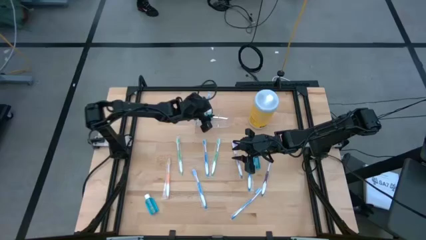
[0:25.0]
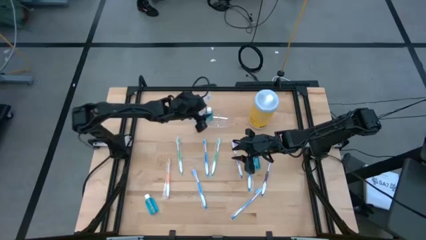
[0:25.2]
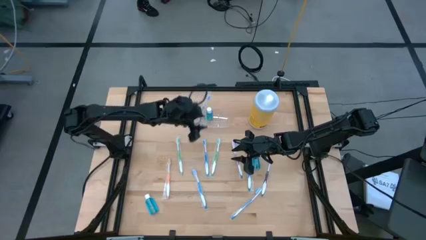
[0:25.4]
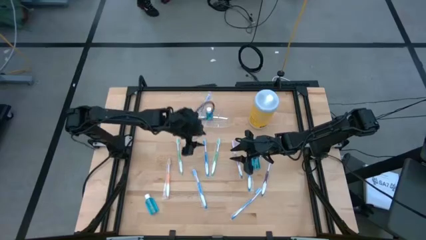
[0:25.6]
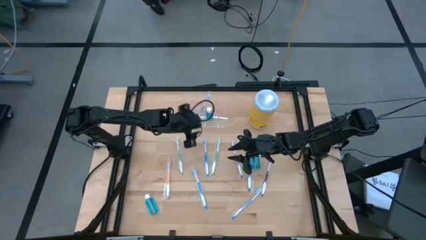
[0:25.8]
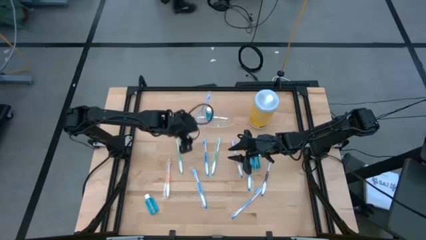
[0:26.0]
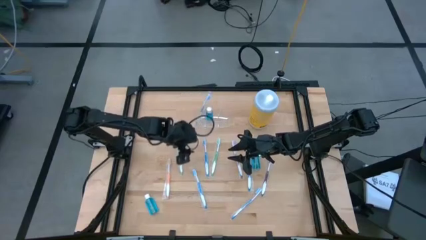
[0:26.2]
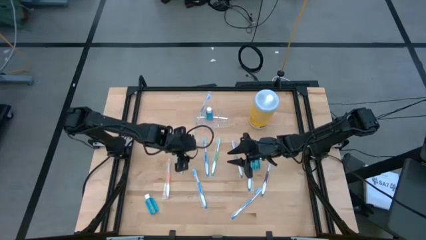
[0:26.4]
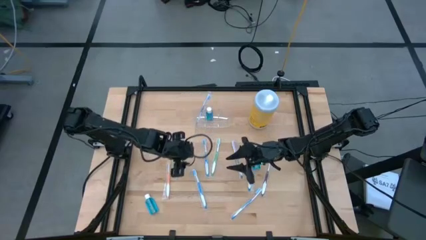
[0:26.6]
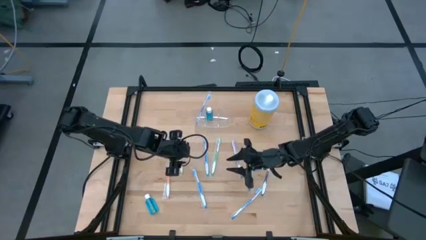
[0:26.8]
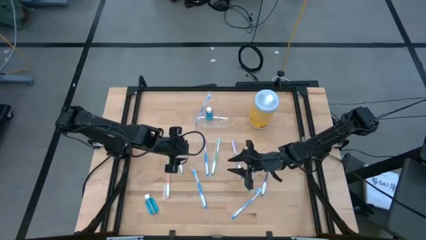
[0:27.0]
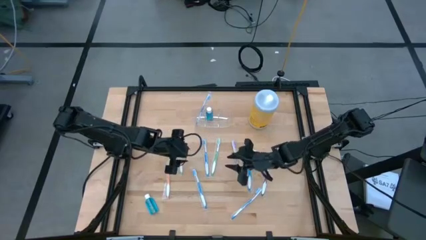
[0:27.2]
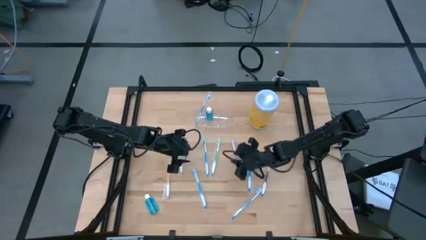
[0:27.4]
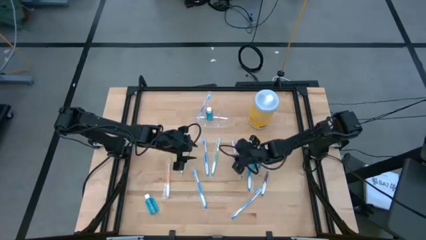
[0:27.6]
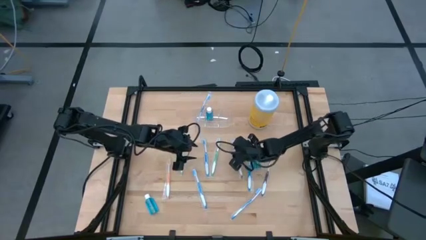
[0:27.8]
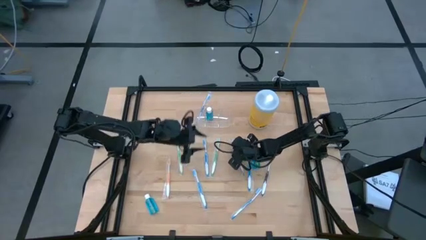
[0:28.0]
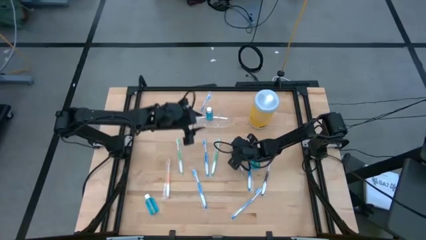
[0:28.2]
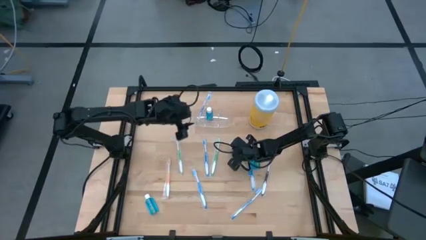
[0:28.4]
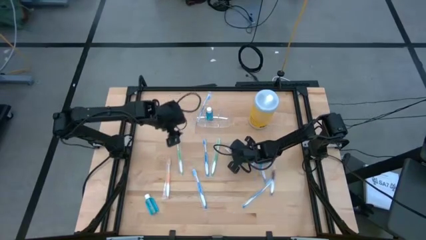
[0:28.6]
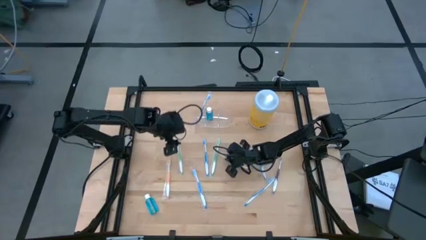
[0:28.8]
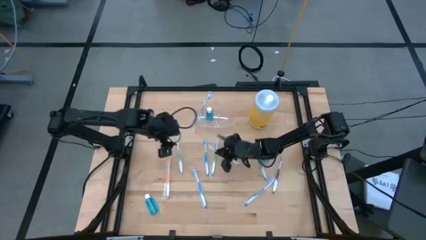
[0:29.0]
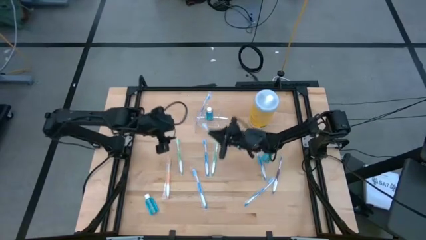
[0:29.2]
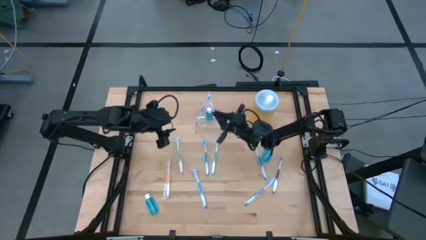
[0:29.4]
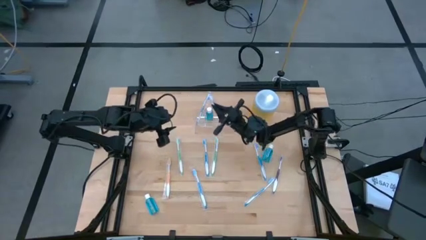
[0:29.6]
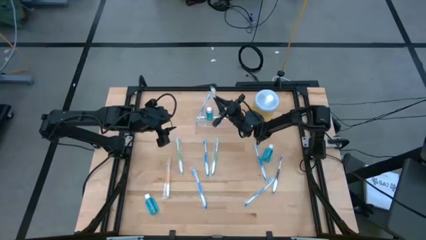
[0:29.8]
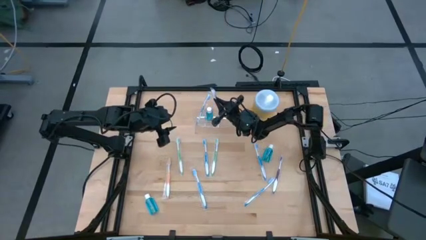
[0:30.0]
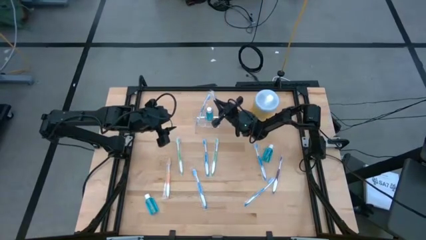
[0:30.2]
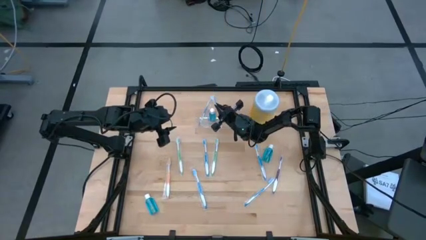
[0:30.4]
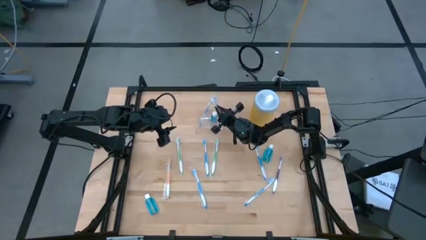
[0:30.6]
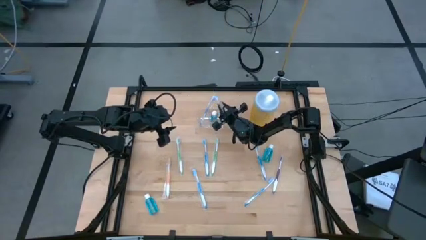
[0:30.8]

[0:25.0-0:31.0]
Task: Pick & Place toothbrushing station
Put the violet toothbrush into the right compartment of the transparent organizer

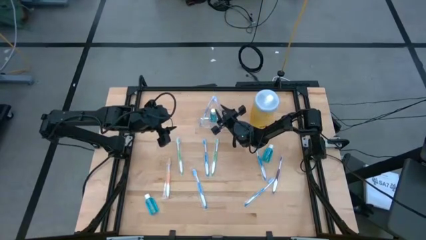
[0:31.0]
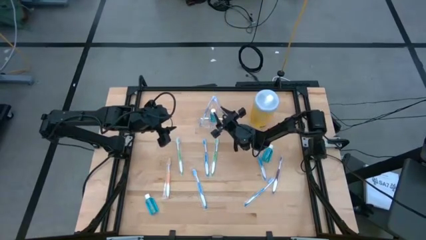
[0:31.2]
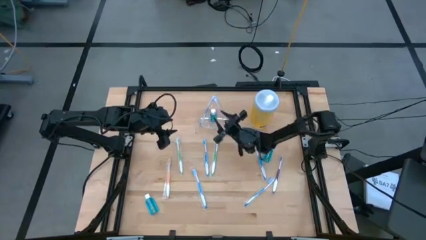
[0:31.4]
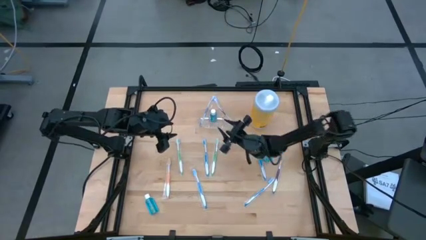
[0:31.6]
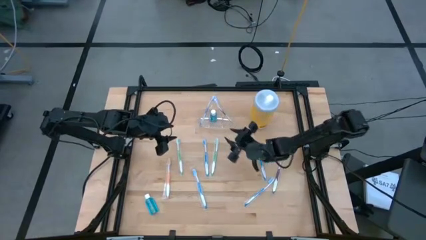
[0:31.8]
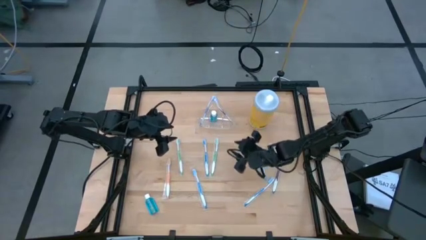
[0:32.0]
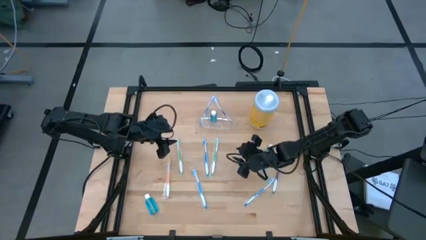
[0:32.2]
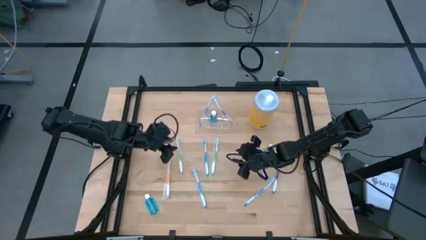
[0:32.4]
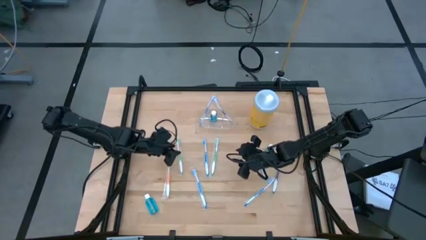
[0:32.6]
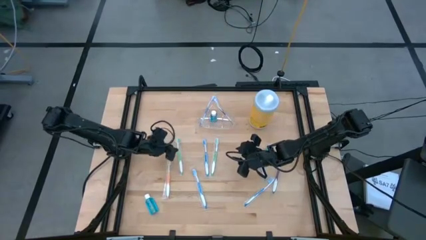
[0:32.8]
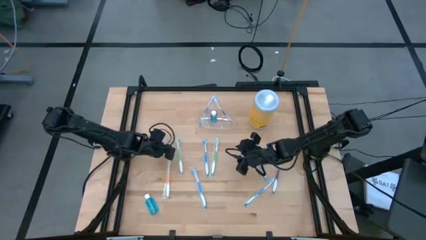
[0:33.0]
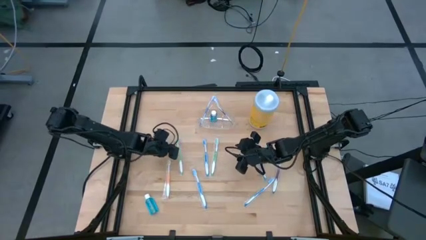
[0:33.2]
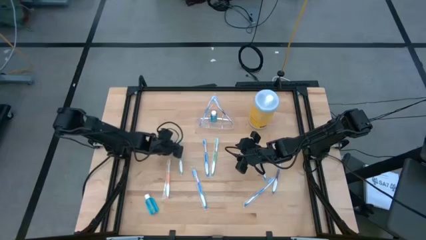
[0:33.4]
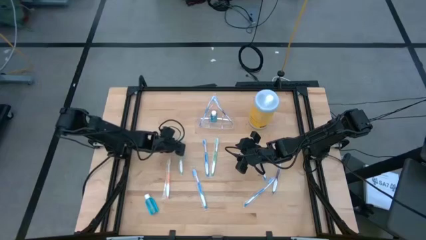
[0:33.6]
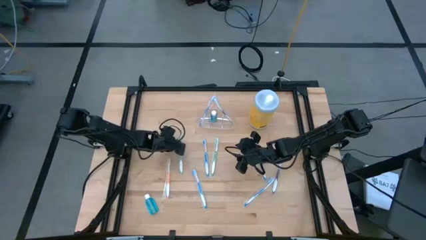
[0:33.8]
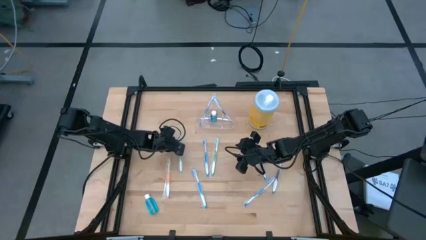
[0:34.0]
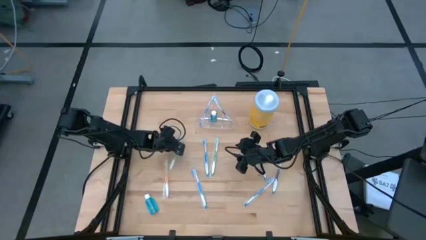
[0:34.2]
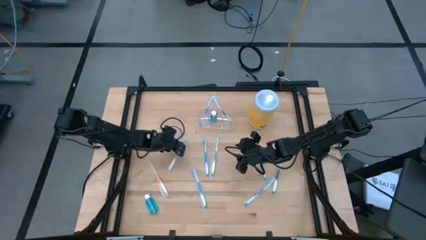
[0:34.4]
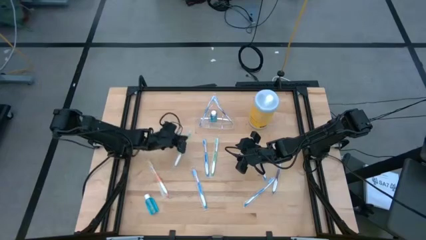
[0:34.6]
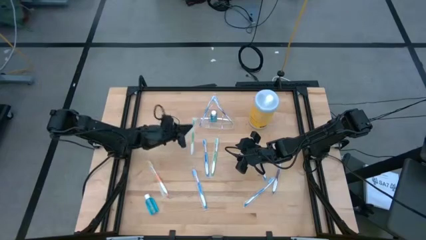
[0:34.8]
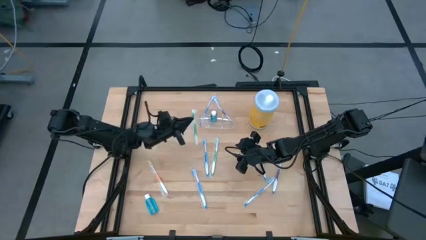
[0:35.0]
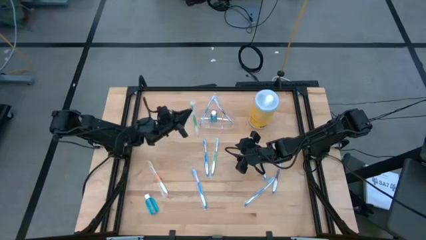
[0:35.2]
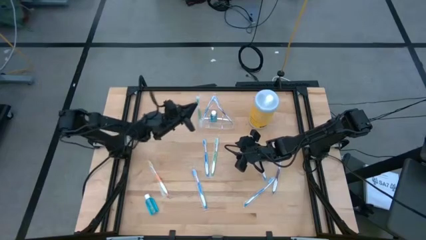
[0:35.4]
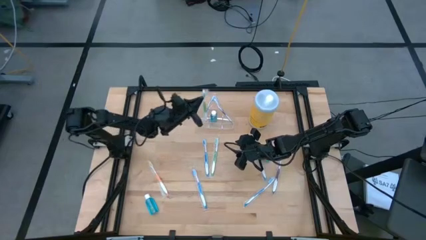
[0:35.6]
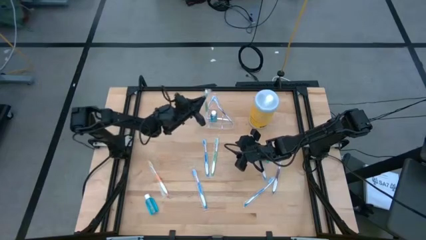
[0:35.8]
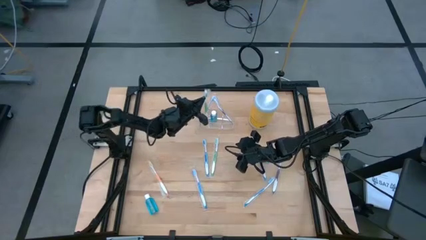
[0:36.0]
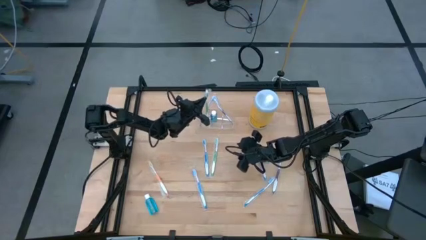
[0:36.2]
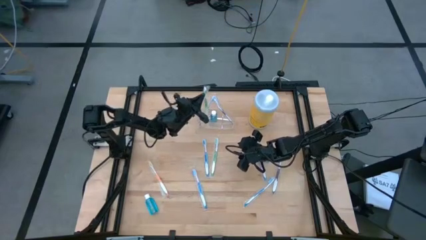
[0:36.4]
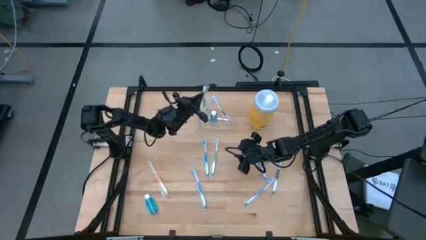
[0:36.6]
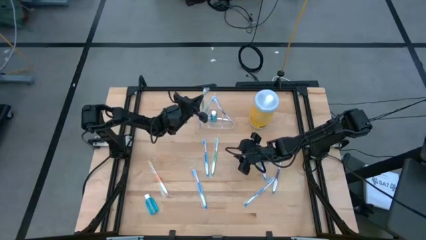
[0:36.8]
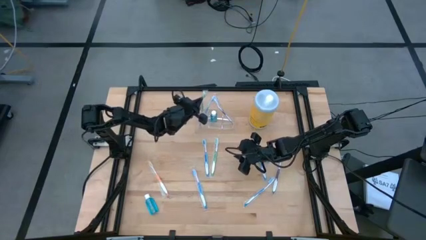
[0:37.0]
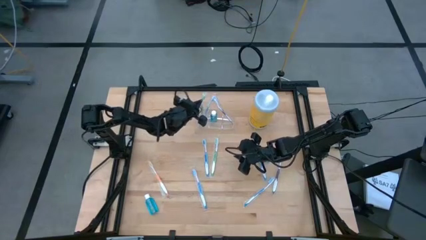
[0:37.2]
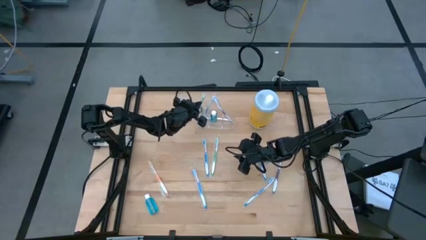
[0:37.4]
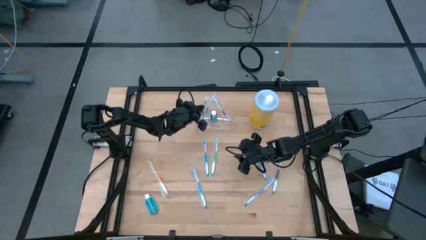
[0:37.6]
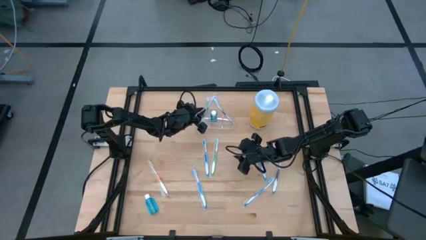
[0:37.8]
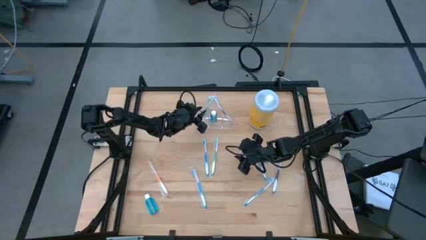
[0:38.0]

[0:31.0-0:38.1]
Put the green toothbrush into the left compartment of the transparent organizer

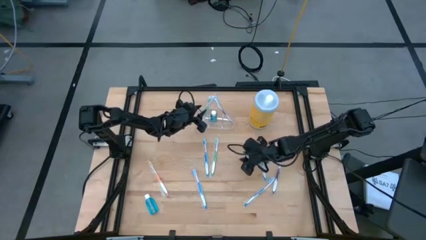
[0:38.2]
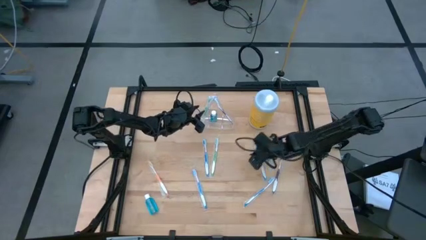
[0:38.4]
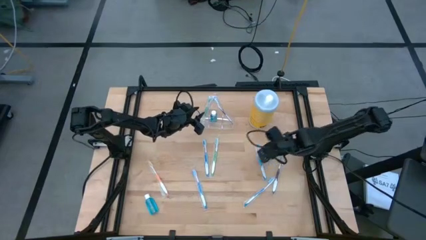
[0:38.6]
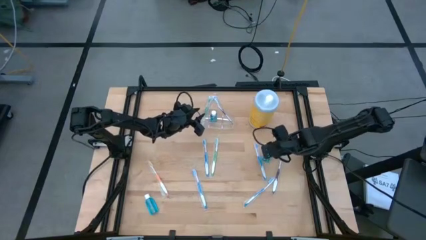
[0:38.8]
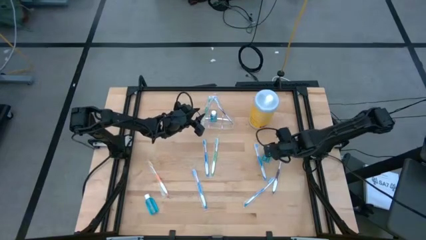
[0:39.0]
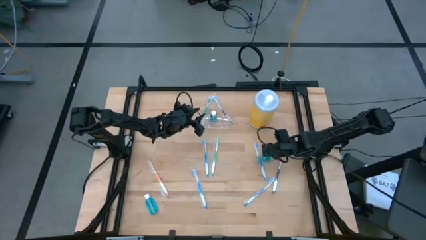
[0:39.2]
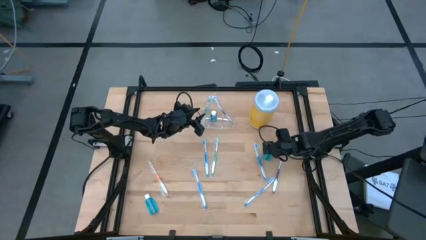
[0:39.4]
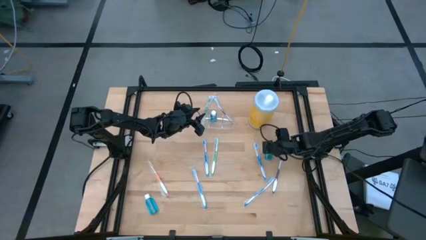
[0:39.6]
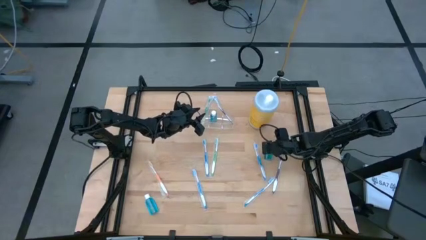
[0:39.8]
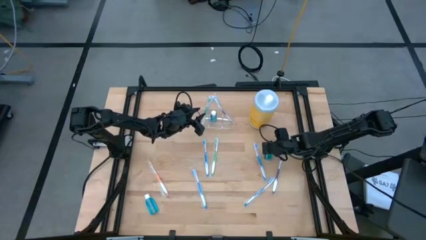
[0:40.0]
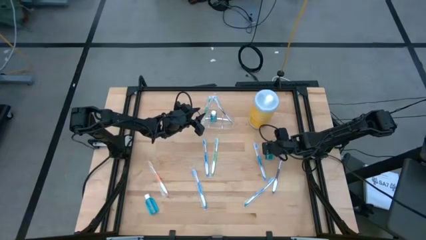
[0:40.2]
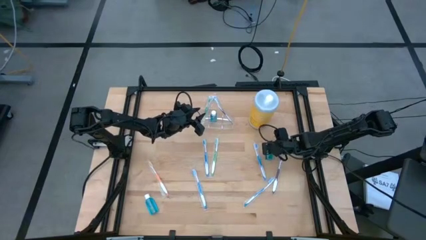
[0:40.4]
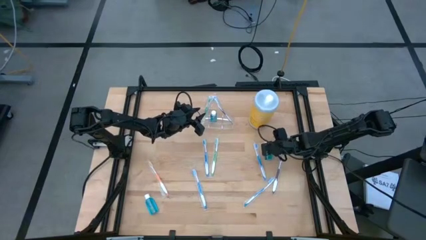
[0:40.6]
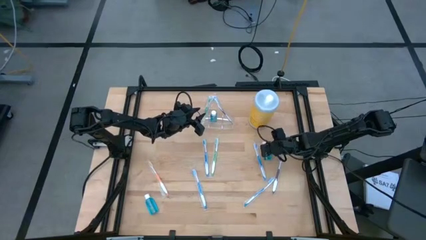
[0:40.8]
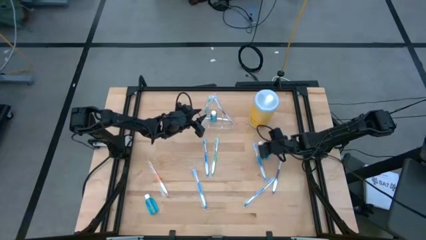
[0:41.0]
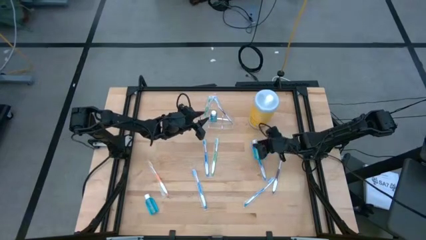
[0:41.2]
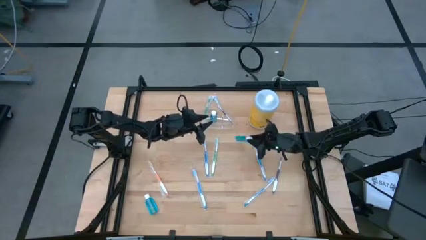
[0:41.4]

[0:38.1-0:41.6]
Put the blue mouthwash into the middle compartment of the transparent organizer
